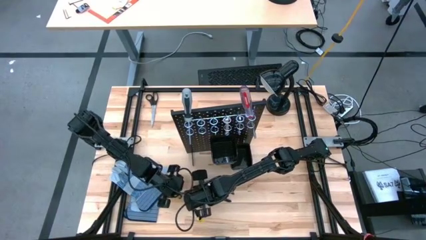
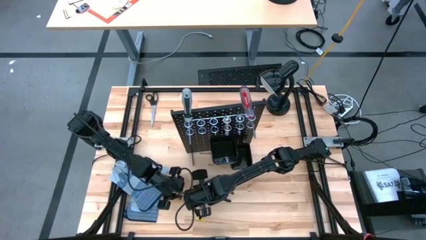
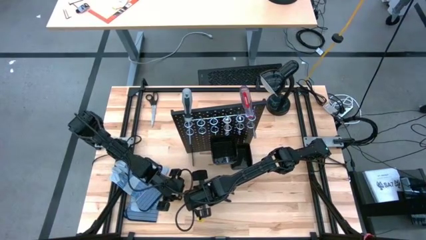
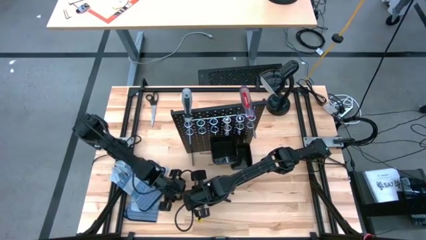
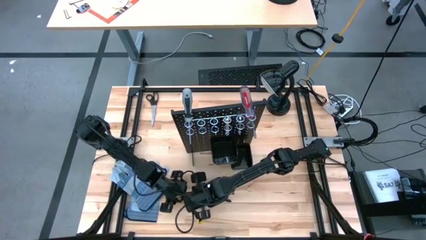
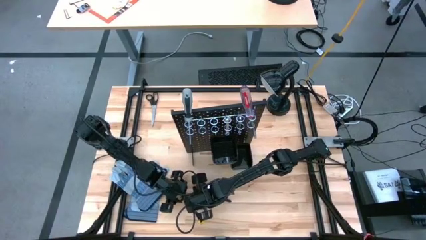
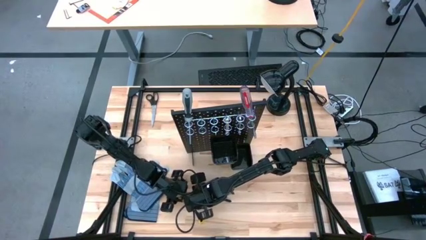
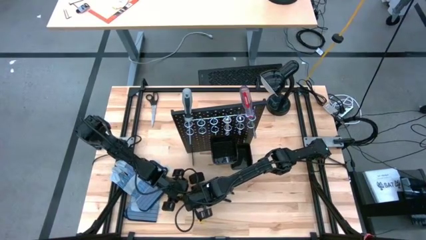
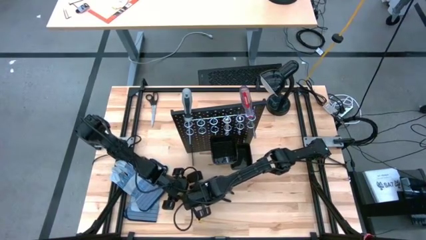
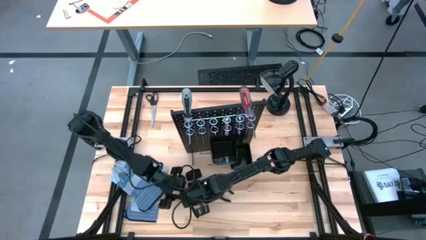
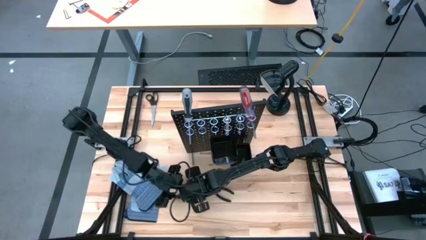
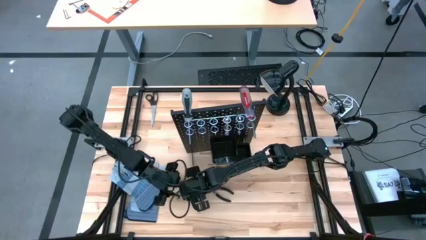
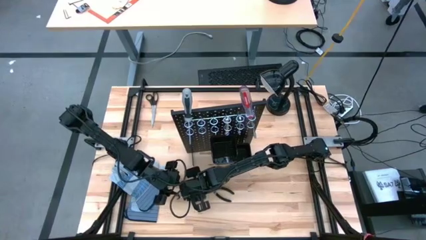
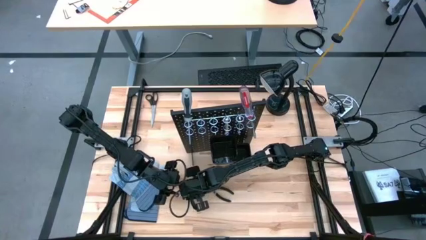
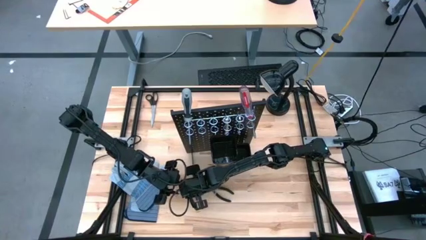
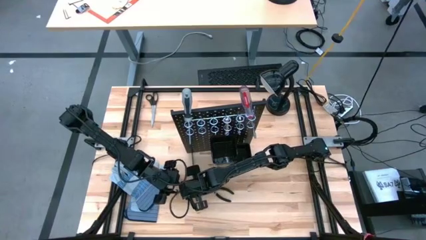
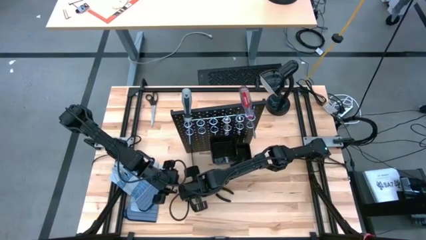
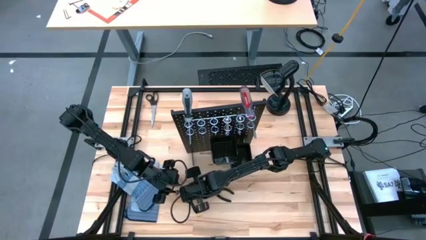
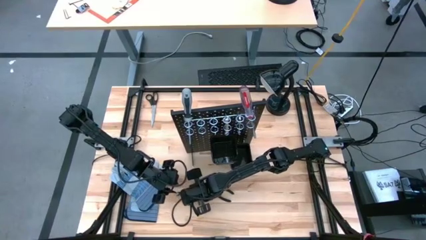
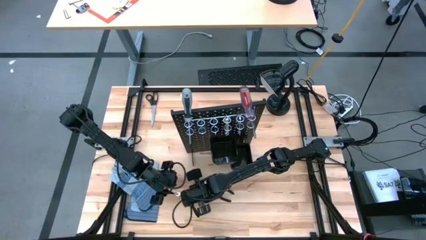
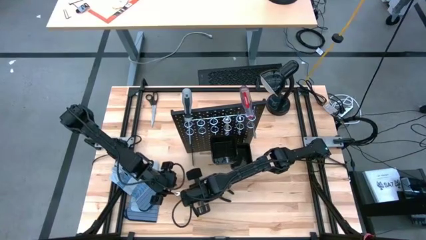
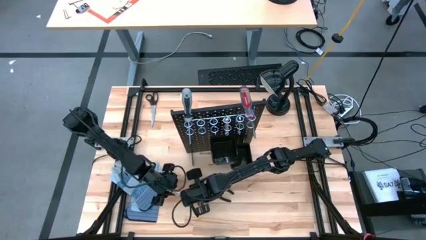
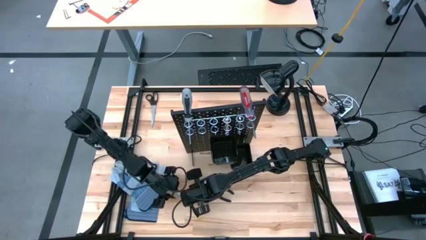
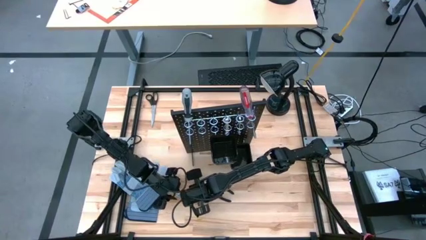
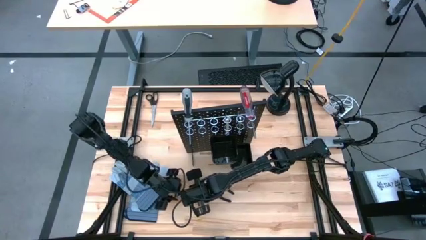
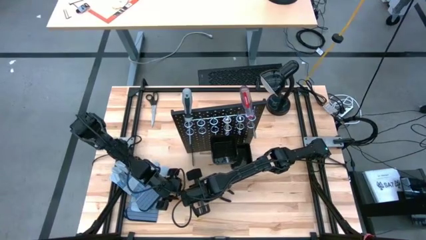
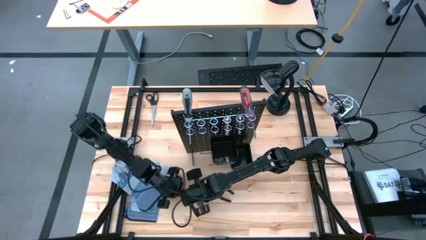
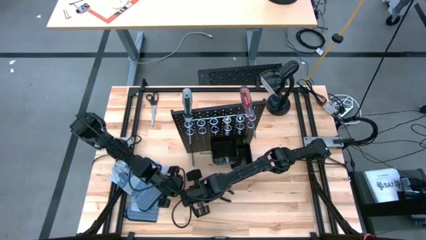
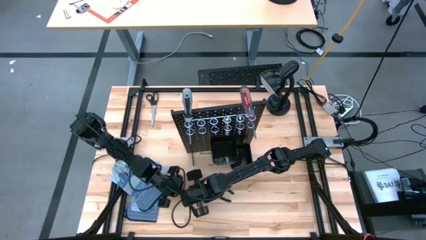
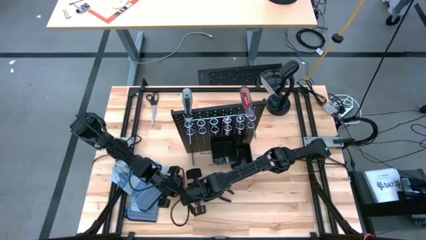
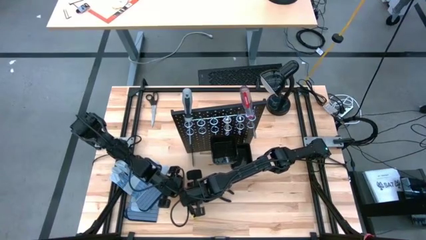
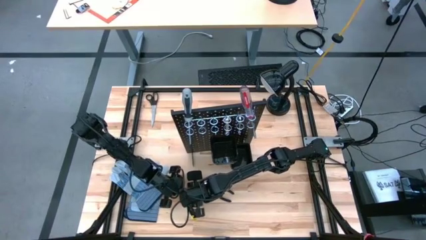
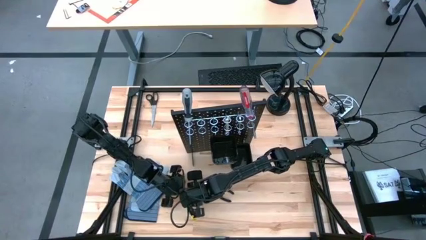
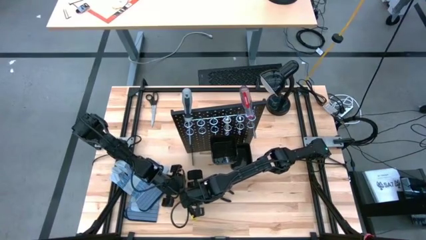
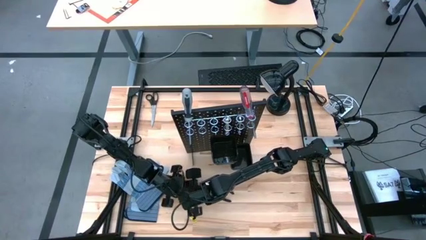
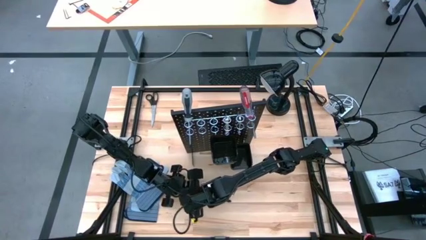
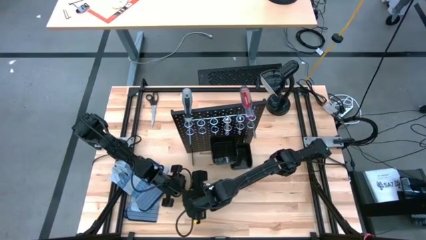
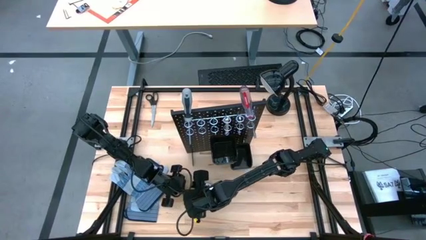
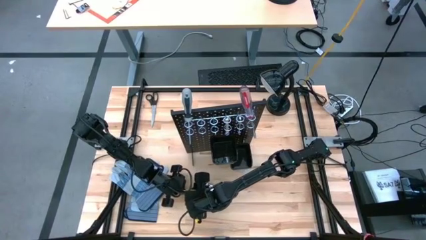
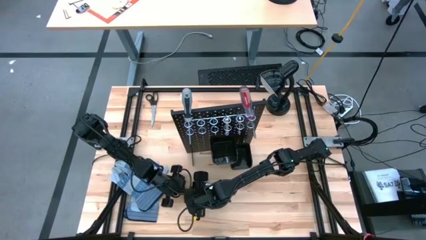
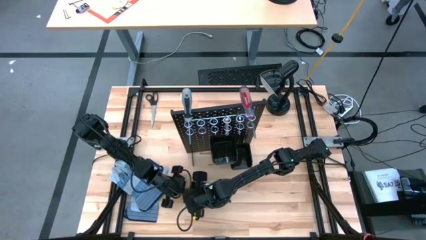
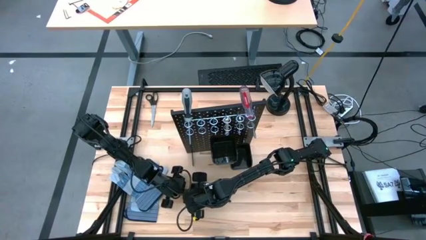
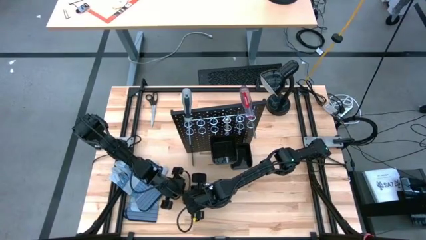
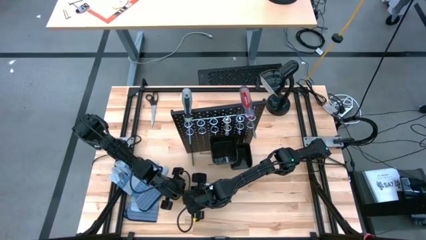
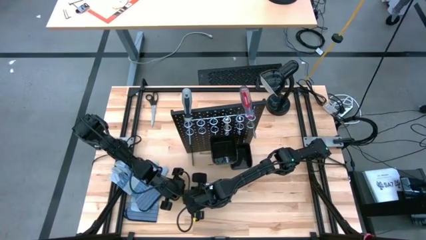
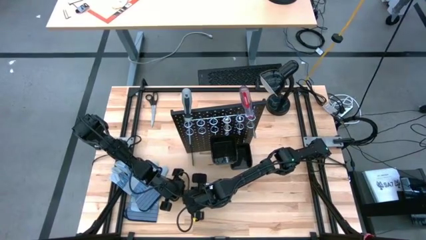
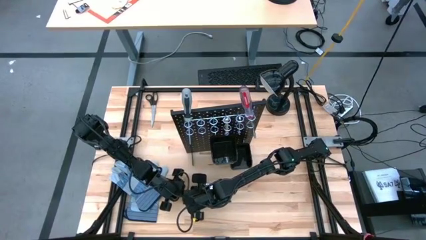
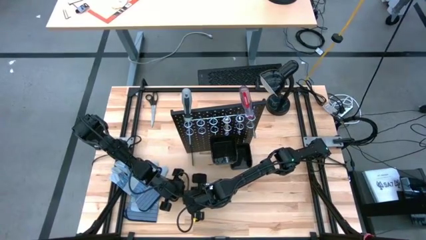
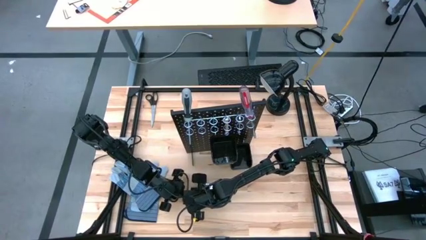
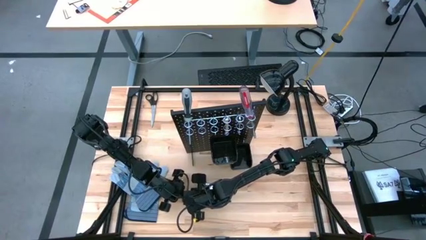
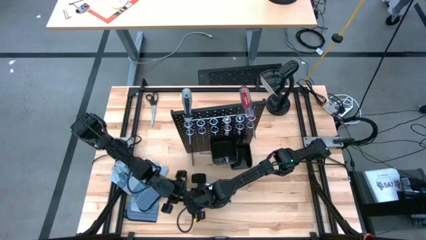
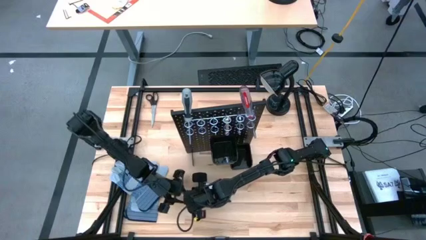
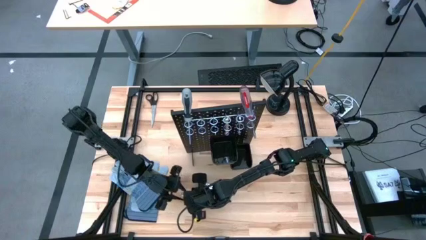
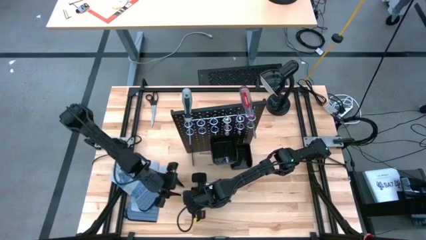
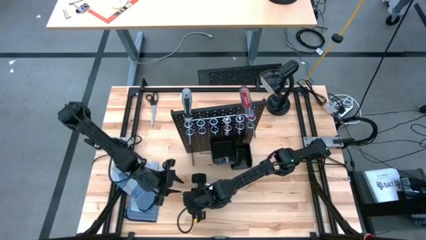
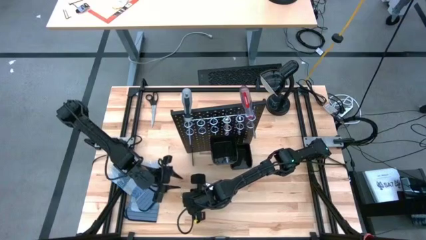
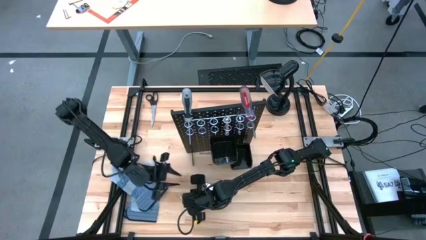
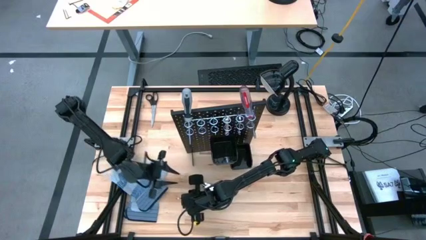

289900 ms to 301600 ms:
Task: Hang tools onto peg board
Hang the silver wrench on the black peg board
